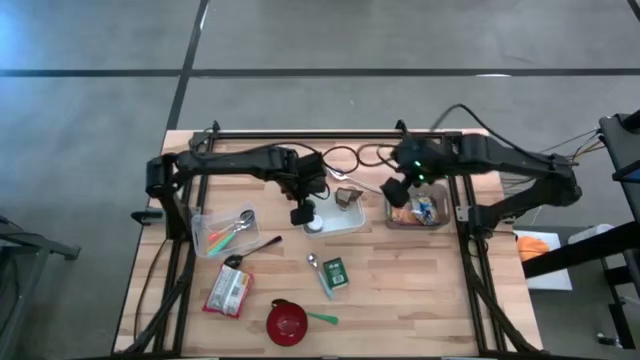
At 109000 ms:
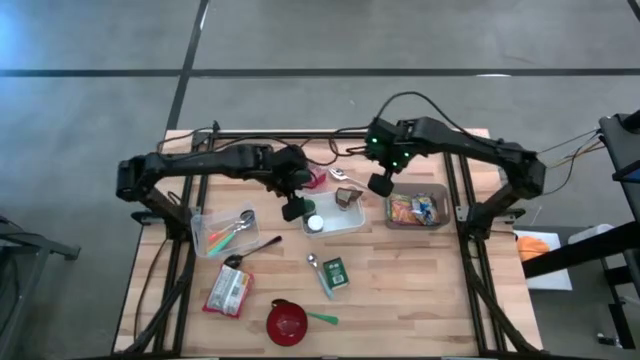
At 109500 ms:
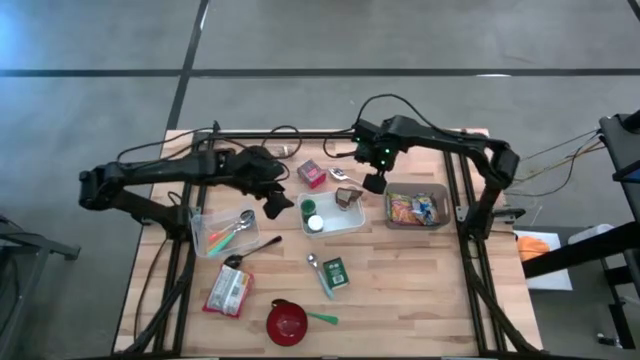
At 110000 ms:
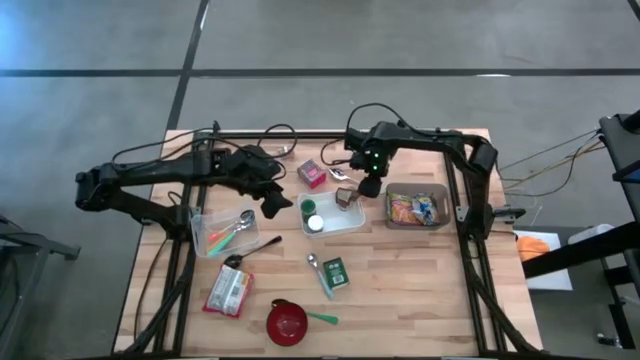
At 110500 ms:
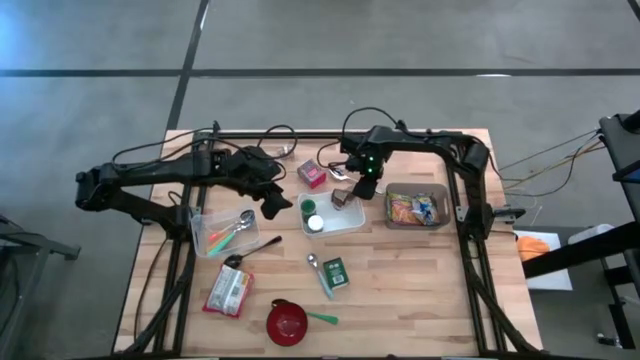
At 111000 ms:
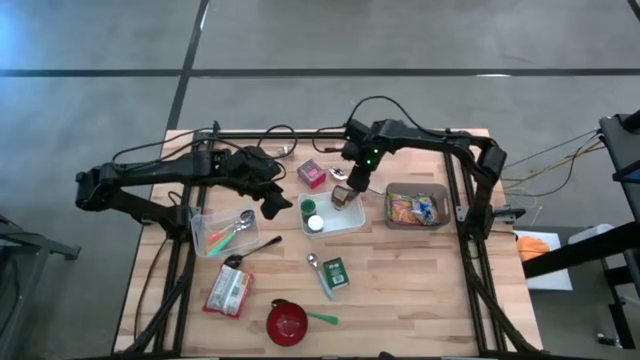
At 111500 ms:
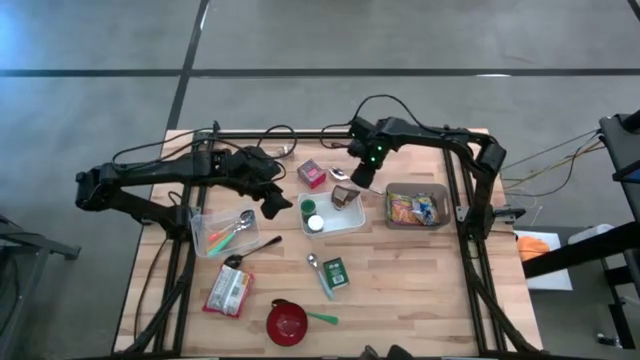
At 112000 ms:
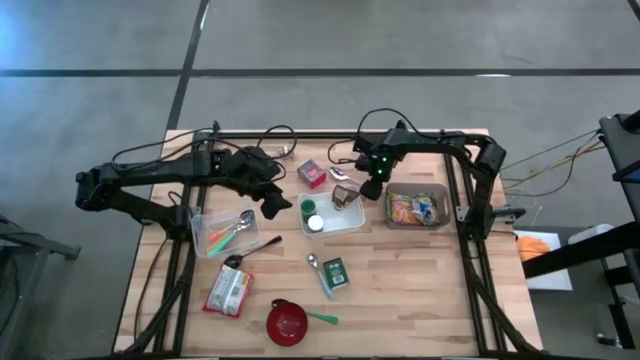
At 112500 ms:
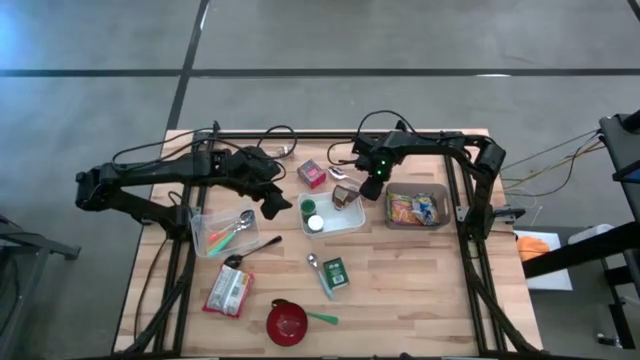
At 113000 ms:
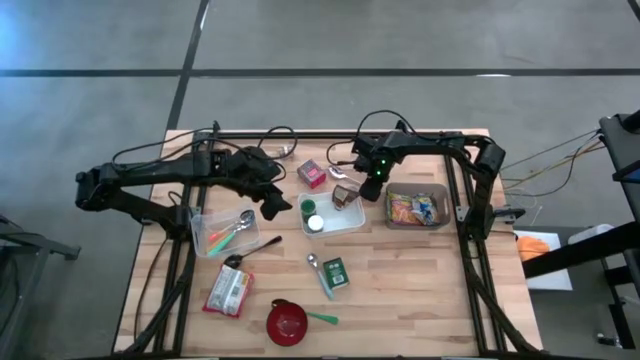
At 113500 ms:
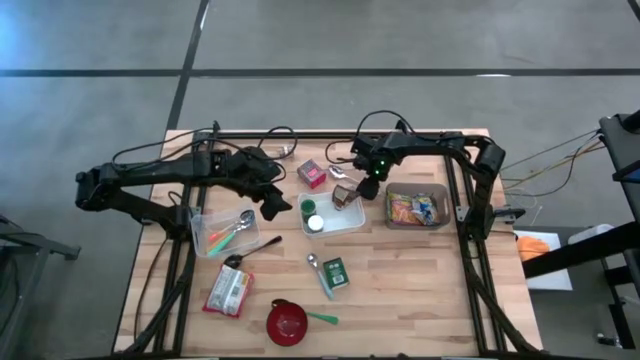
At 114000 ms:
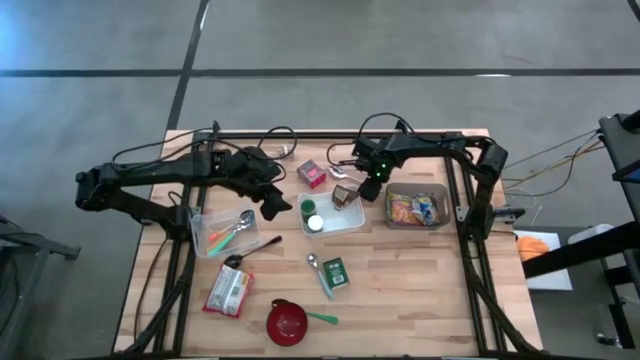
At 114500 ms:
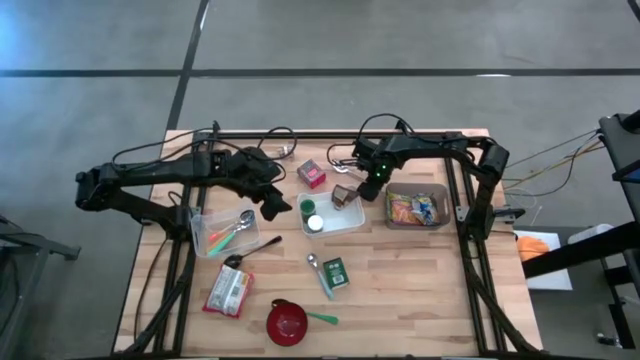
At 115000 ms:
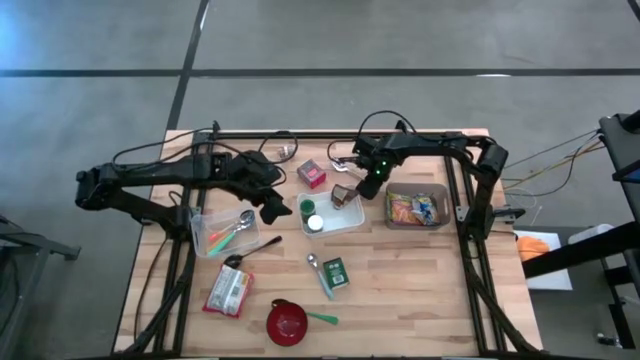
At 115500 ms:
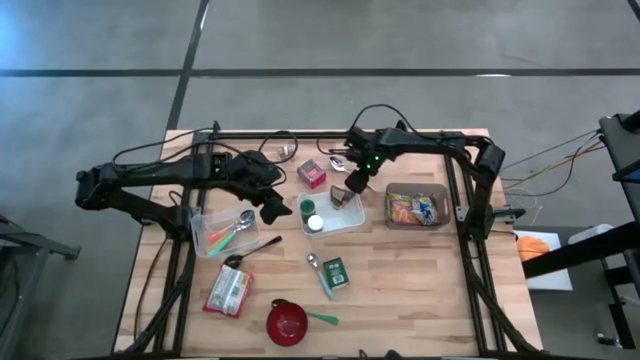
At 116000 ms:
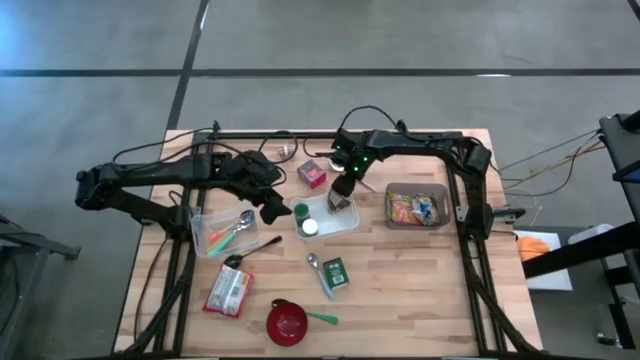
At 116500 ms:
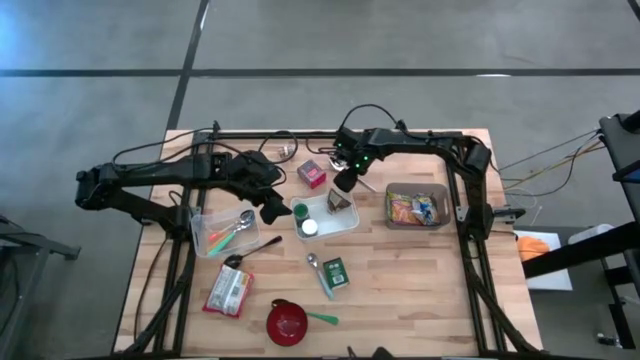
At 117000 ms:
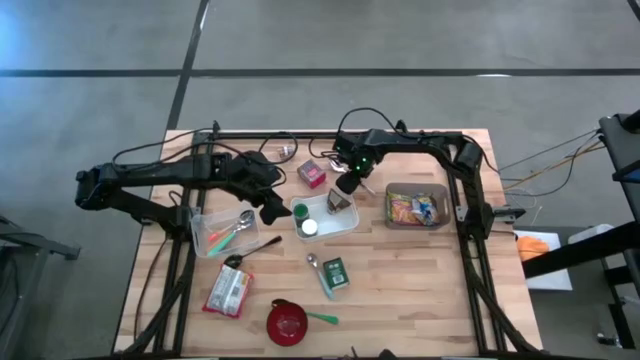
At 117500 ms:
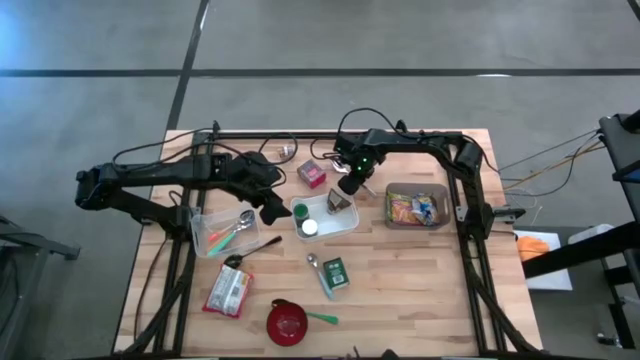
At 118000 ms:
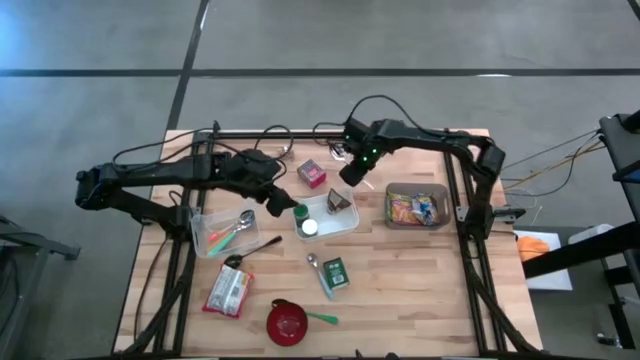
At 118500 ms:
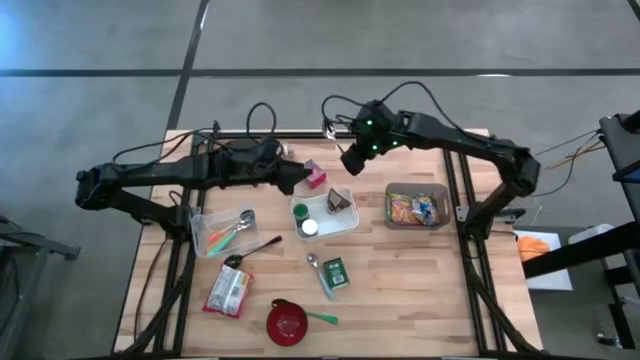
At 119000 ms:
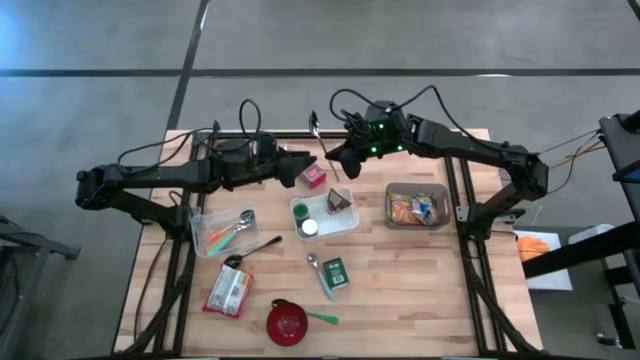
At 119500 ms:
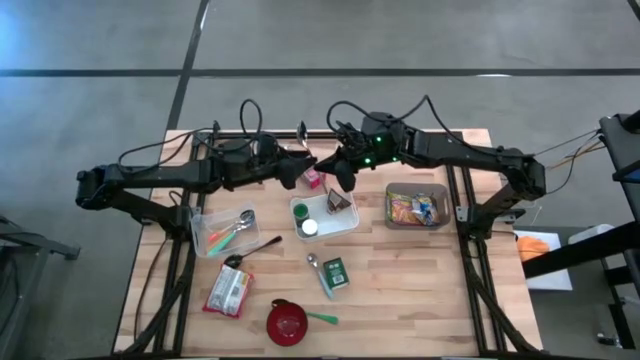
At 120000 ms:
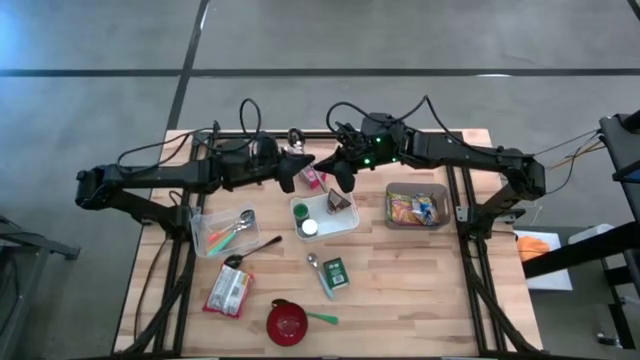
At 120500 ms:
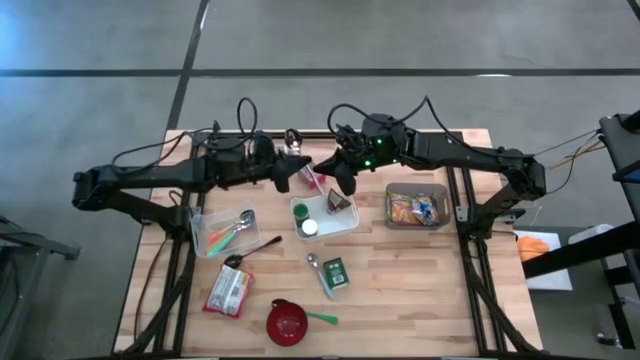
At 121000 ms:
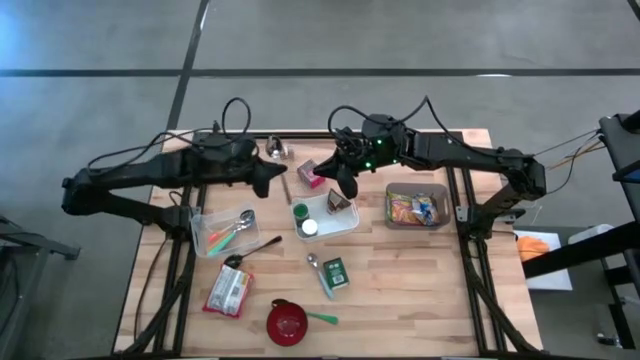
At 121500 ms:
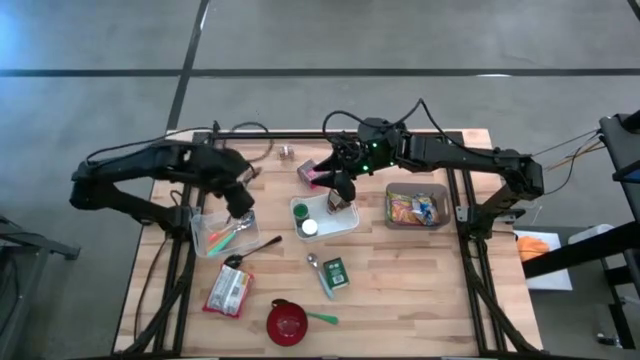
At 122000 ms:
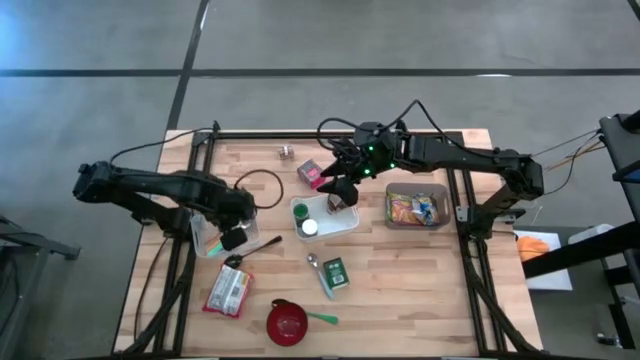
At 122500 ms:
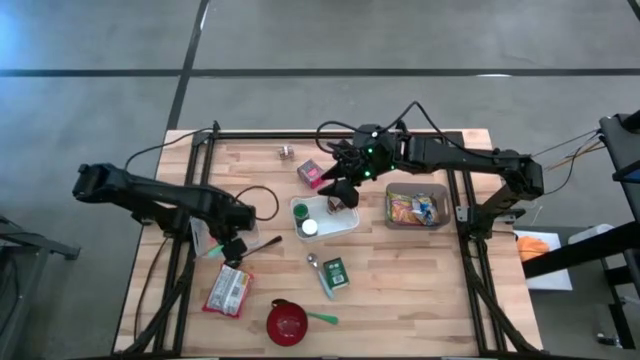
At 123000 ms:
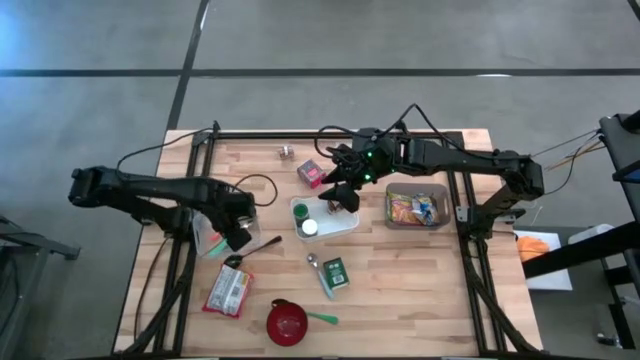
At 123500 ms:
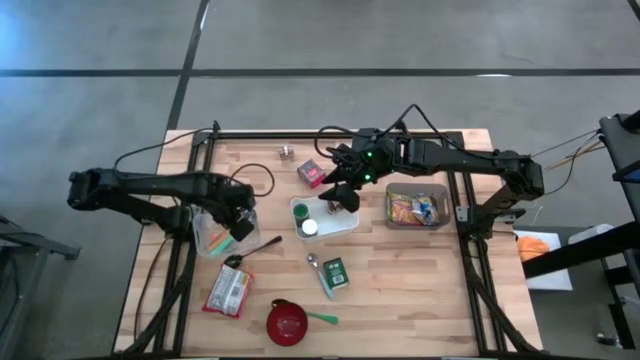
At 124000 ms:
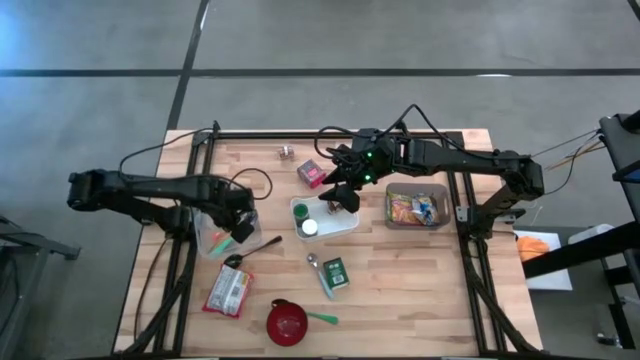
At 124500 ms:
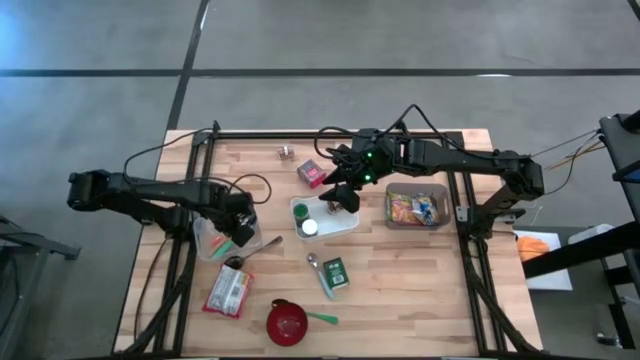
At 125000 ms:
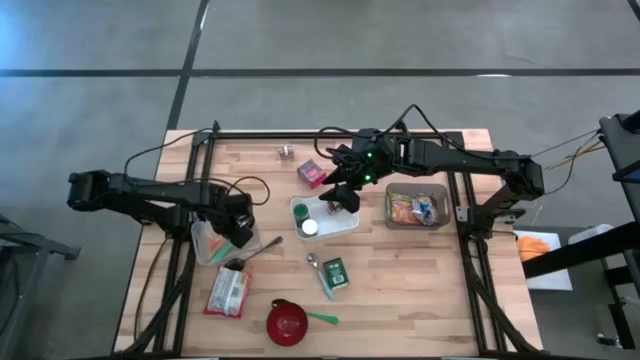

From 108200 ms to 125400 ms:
Put the silver spoon into the transparent bin

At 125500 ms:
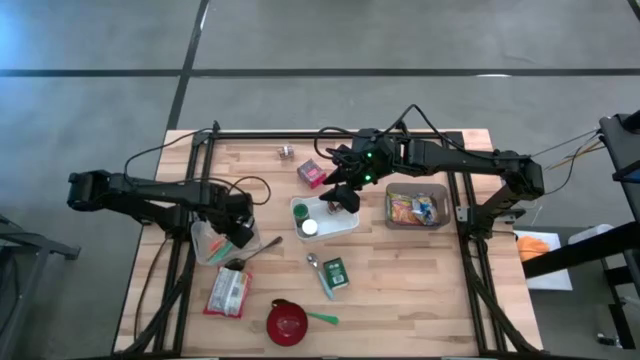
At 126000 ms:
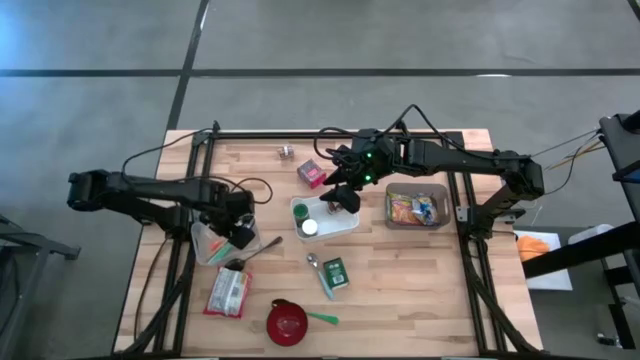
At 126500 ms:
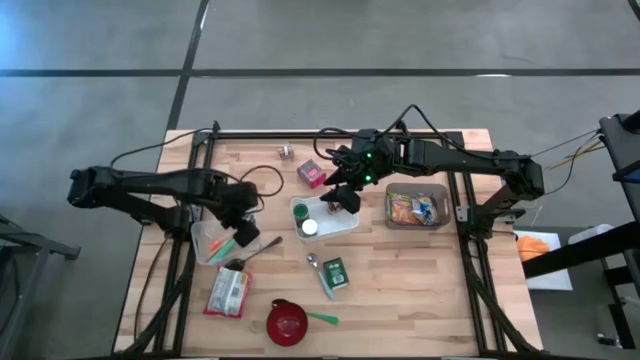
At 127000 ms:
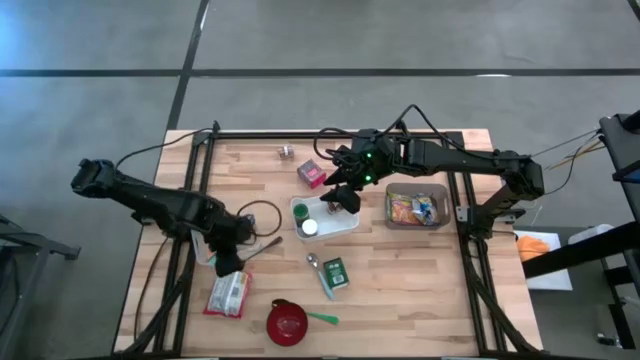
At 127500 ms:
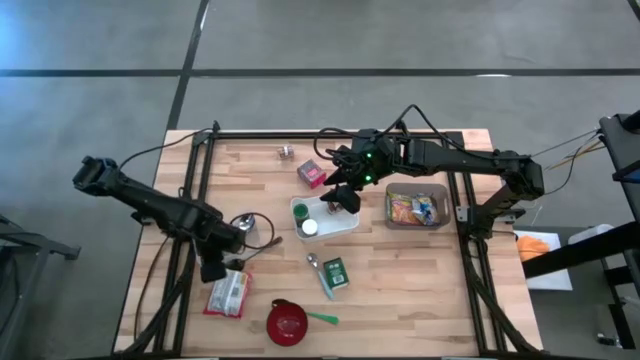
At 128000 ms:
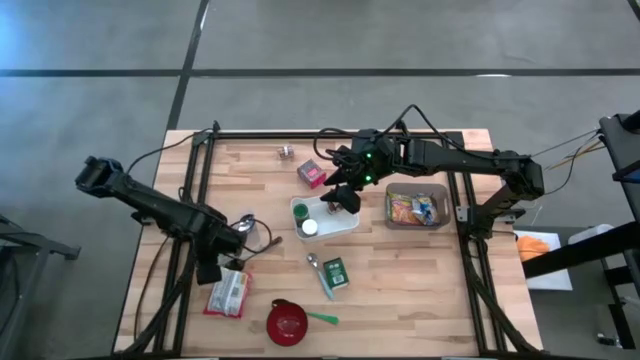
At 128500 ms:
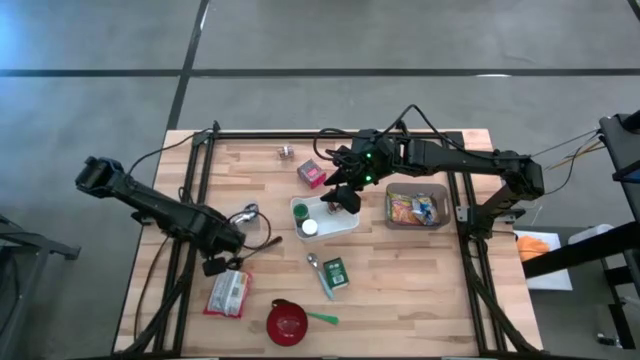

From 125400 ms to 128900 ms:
Adjust the transparent bin
